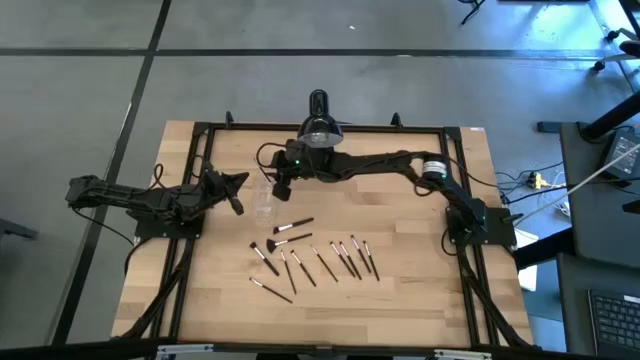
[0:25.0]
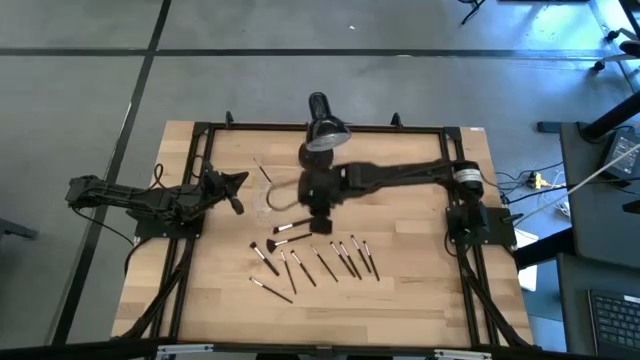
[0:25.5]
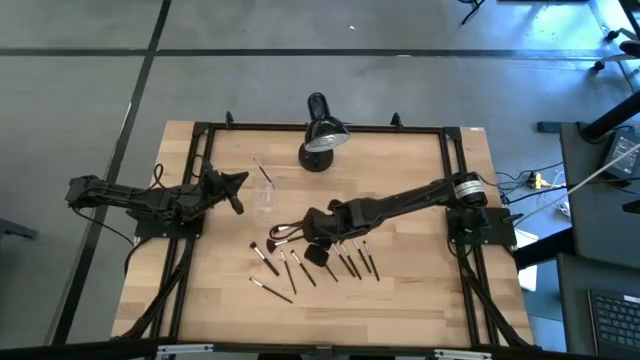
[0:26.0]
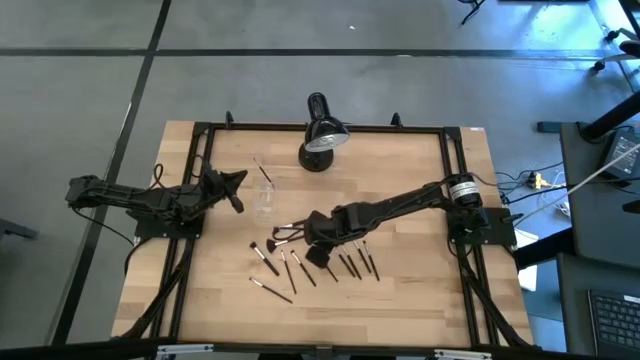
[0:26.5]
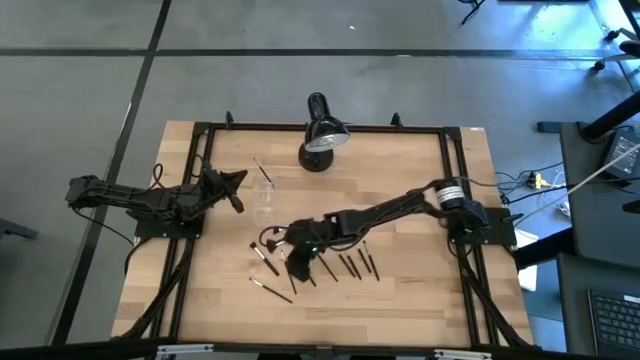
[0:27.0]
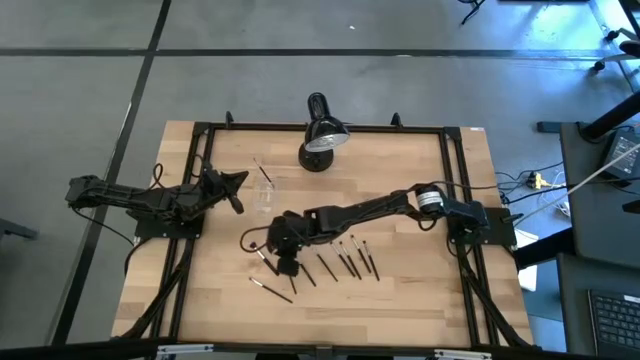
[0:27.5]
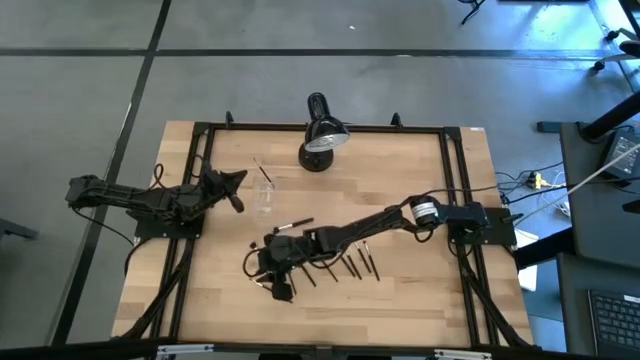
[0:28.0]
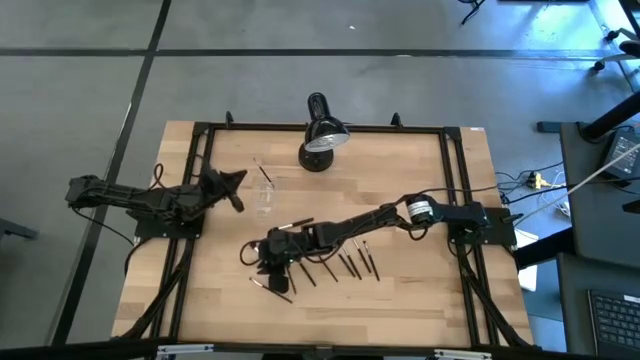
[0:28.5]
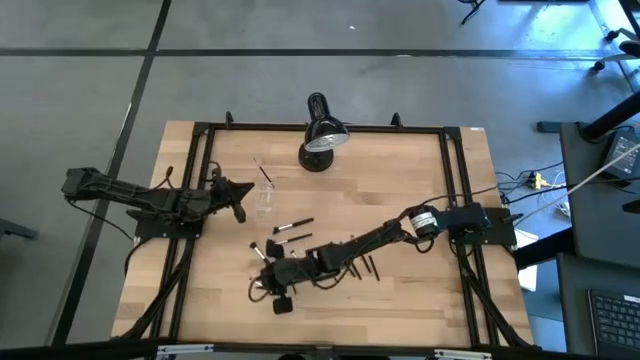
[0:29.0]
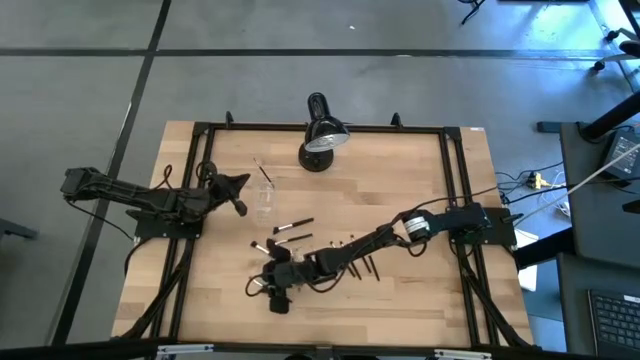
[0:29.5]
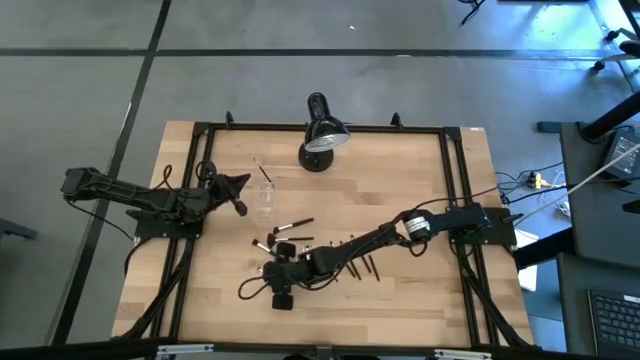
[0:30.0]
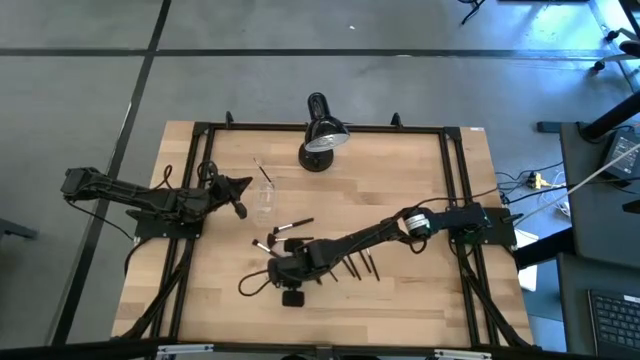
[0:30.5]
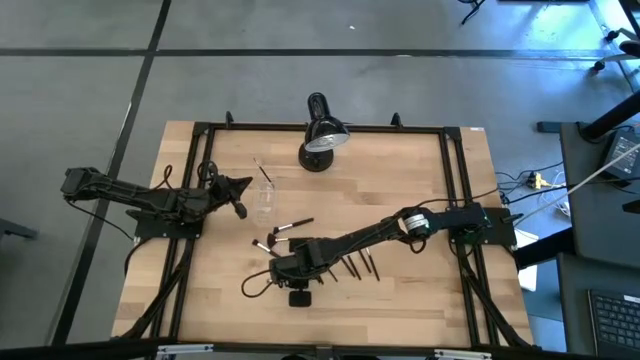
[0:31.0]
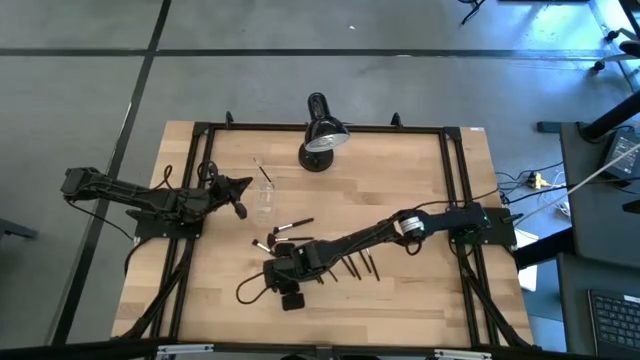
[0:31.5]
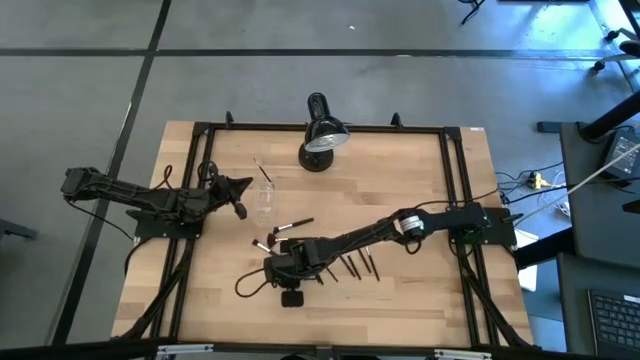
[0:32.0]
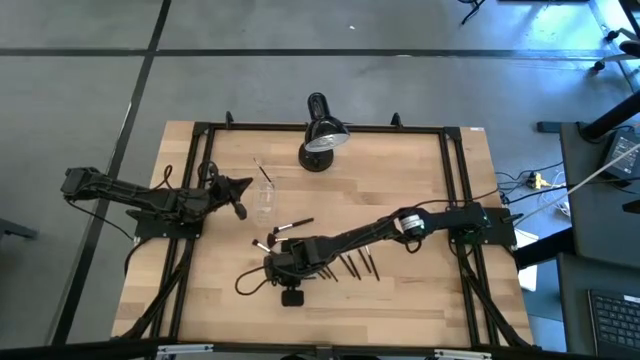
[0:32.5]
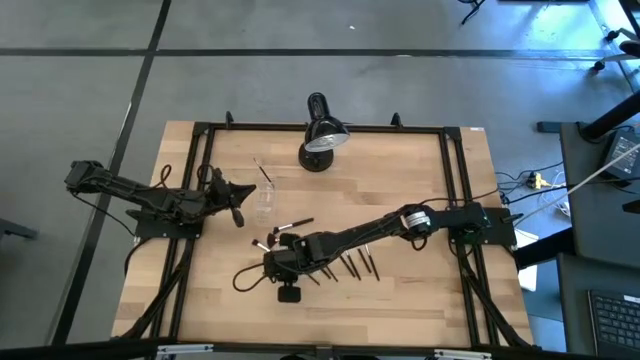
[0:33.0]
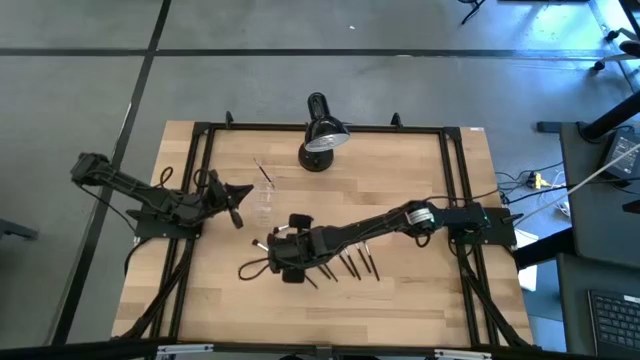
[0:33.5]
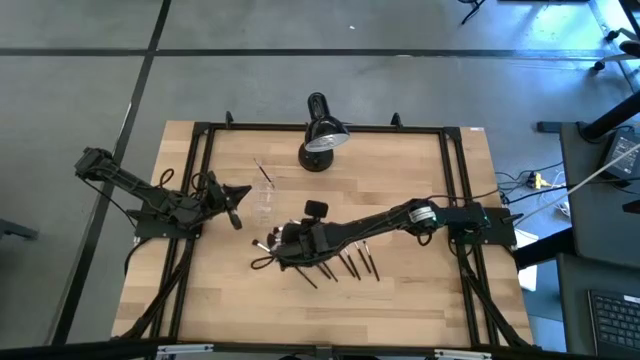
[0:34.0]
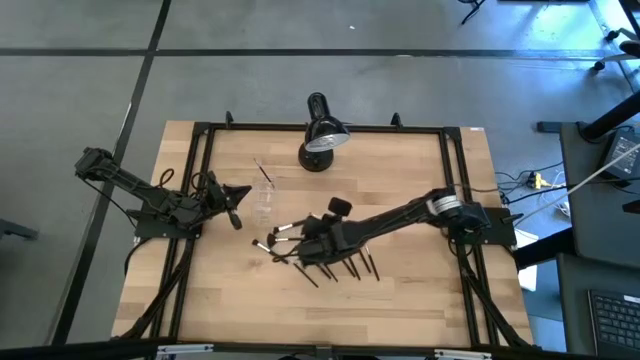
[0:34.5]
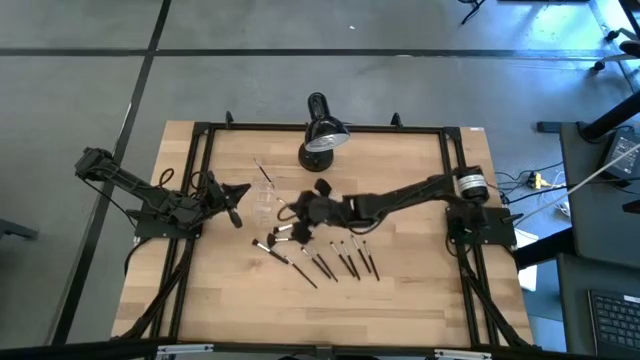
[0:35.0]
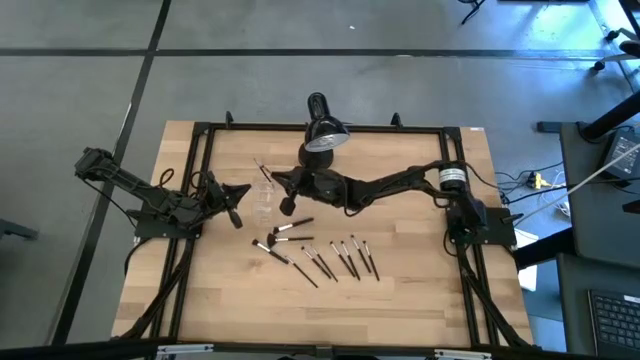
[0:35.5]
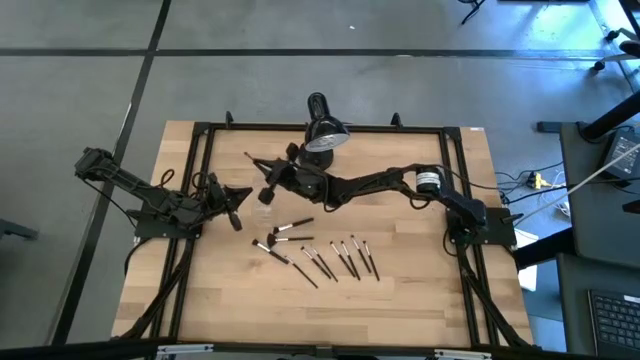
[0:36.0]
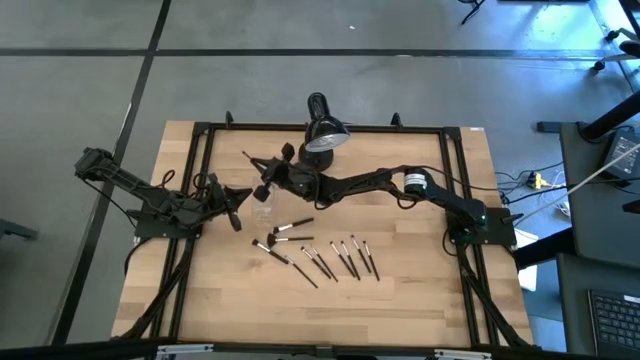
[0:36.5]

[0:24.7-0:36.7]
Task: Sort items
Put the eyeshadow brush into the transparent organizer

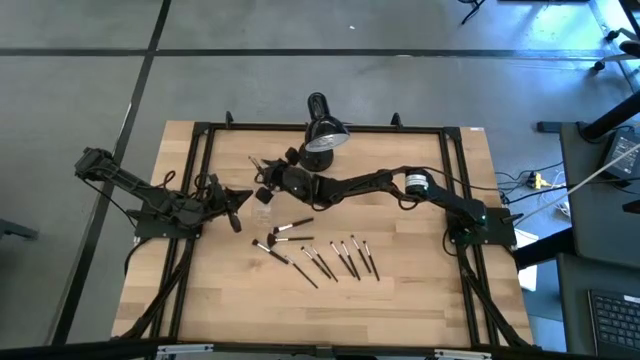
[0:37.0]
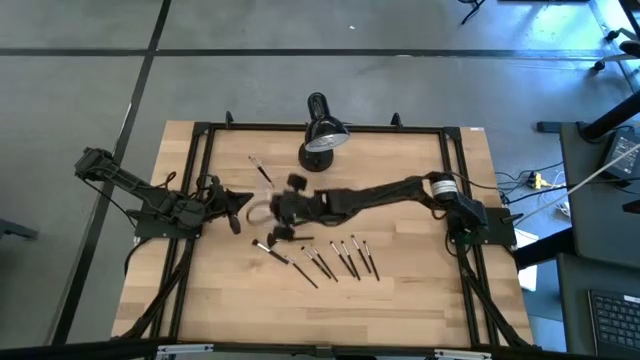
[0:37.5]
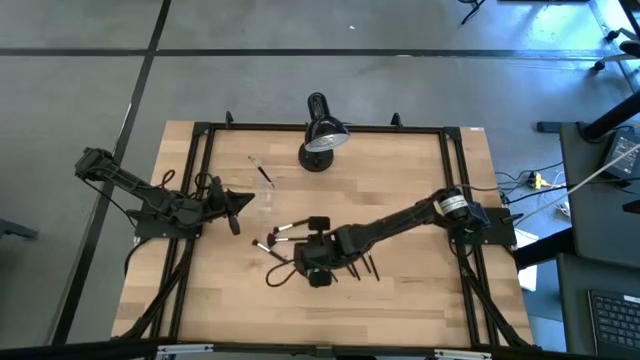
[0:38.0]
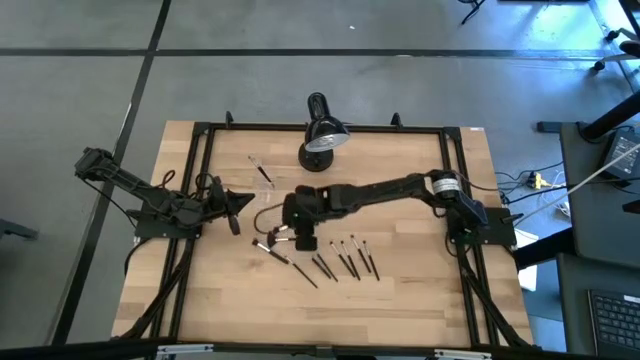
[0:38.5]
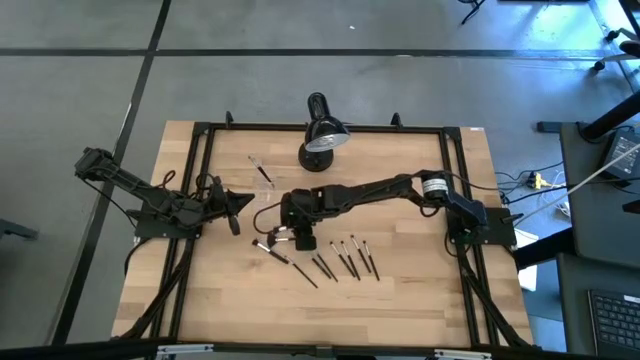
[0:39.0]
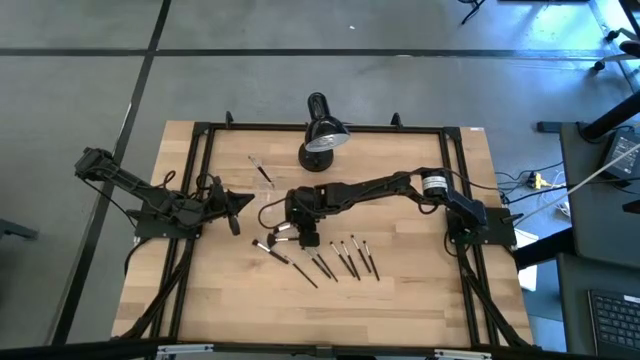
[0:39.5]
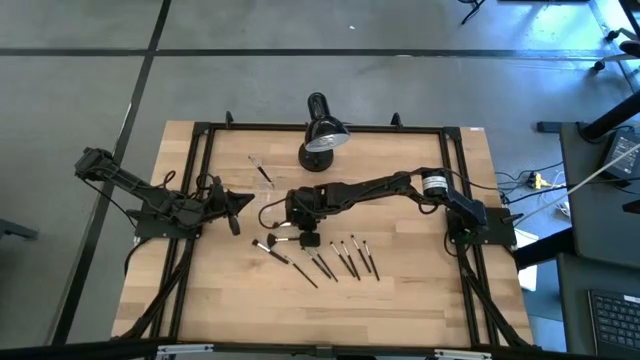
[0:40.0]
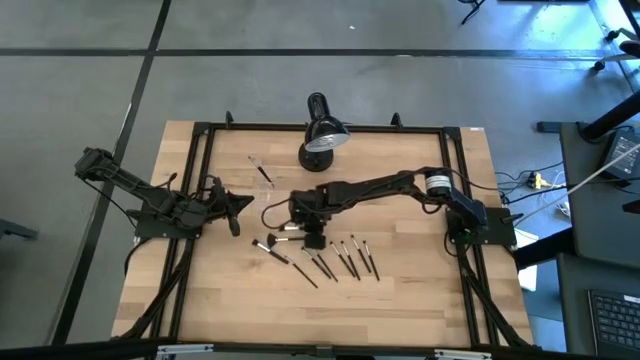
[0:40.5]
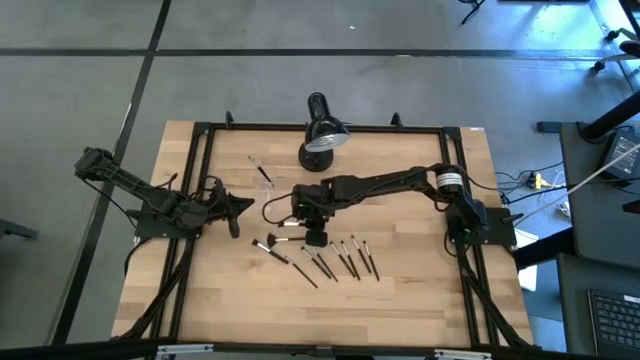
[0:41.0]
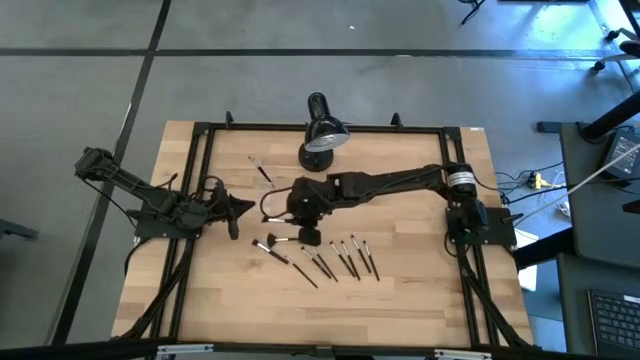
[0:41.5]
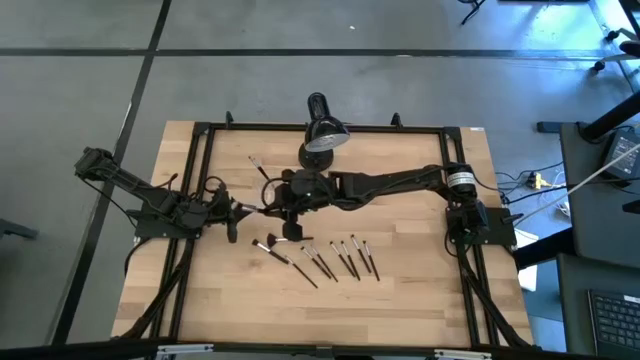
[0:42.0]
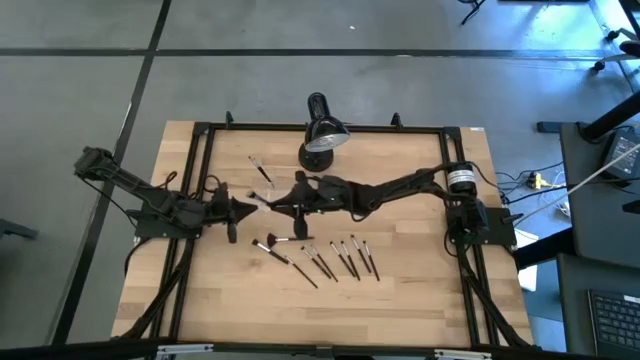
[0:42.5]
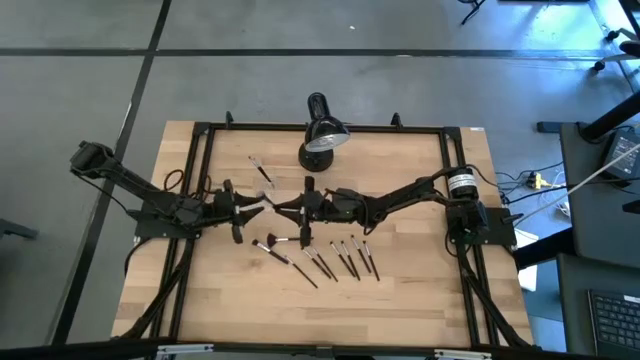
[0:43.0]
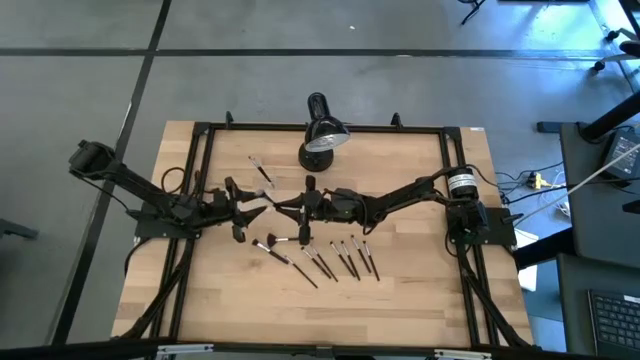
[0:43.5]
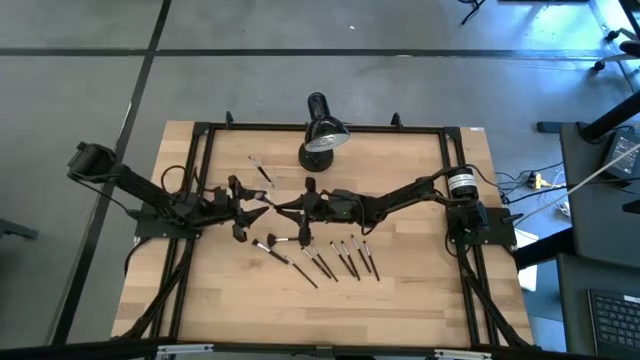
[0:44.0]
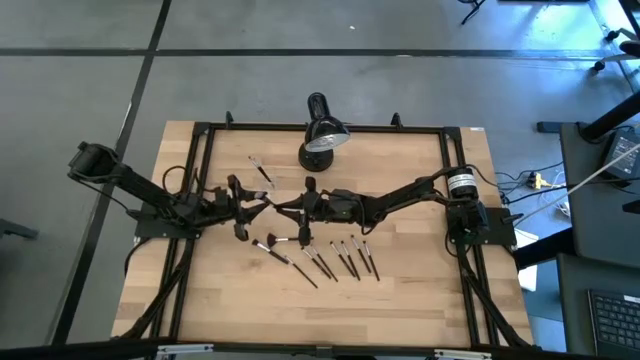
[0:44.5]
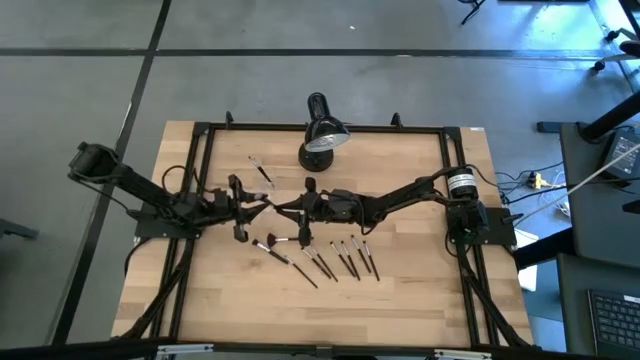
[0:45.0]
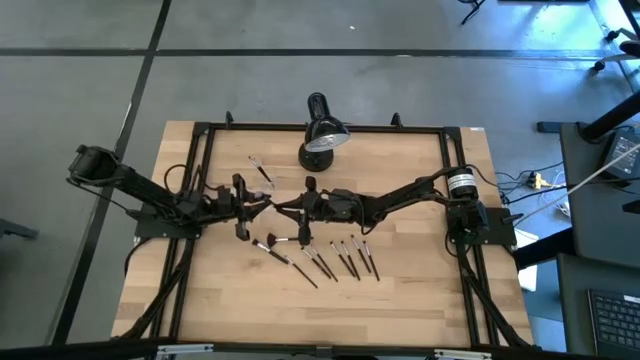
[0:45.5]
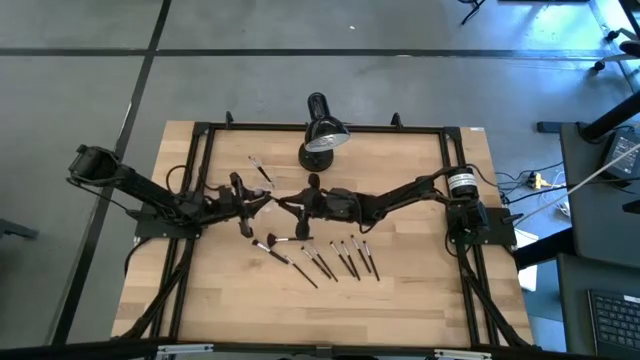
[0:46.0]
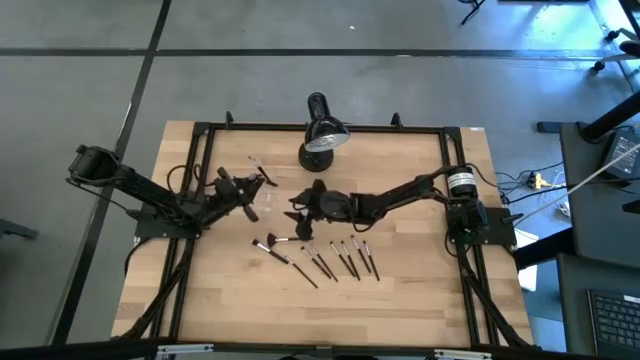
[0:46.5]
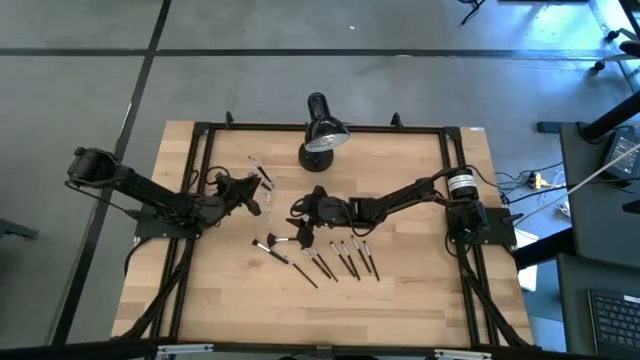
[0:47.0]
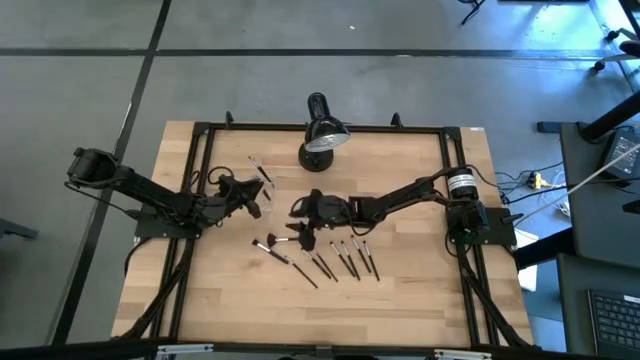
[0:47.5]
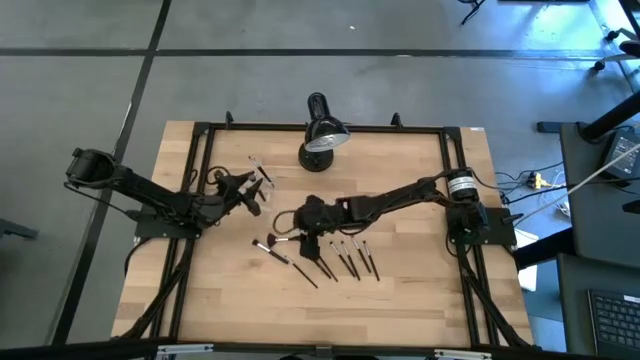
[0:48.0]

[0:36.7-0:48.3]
Put the powder brush into the transparent organizer
